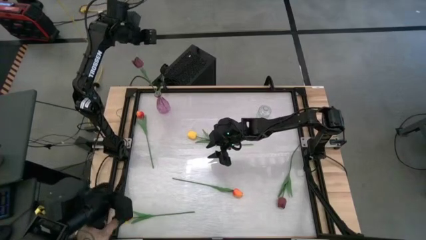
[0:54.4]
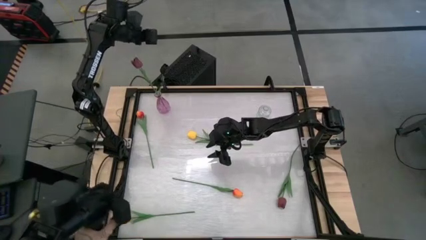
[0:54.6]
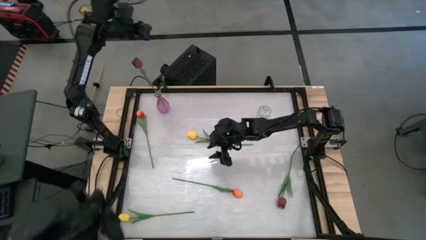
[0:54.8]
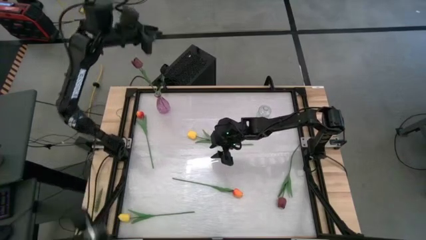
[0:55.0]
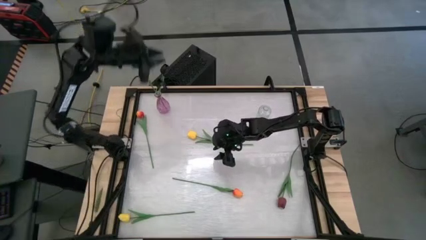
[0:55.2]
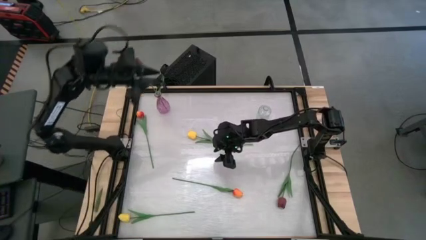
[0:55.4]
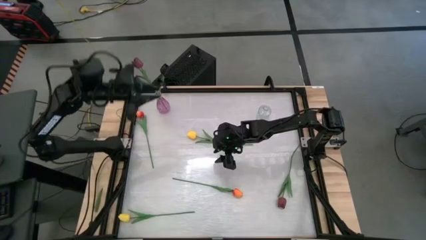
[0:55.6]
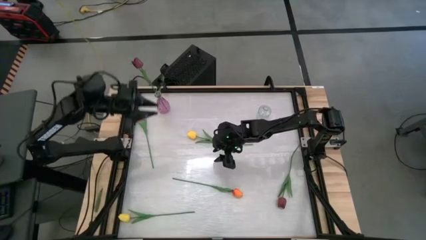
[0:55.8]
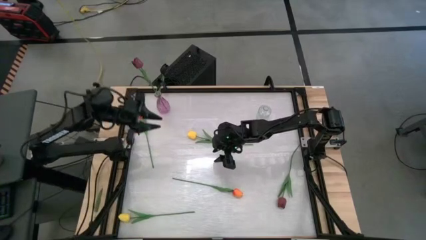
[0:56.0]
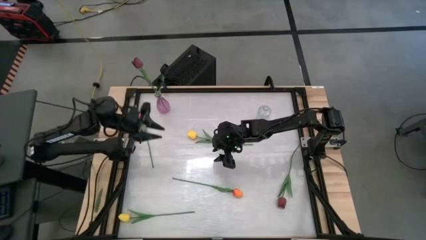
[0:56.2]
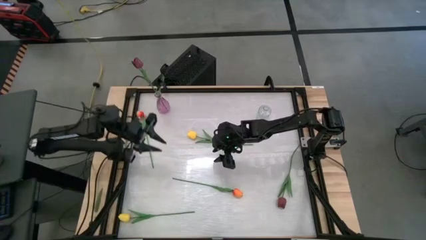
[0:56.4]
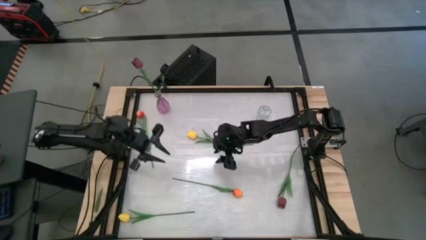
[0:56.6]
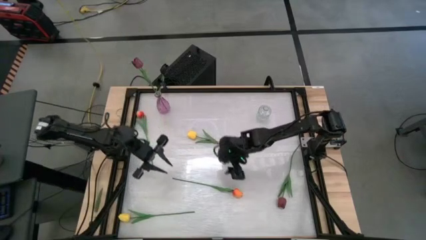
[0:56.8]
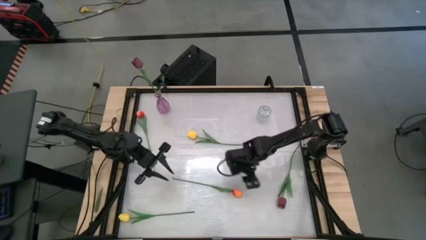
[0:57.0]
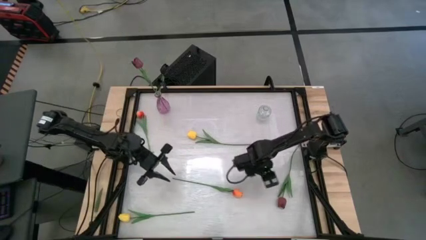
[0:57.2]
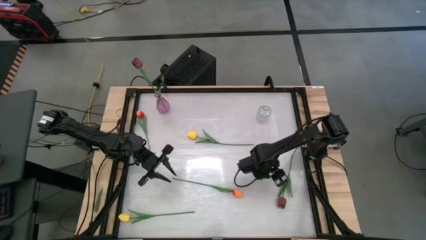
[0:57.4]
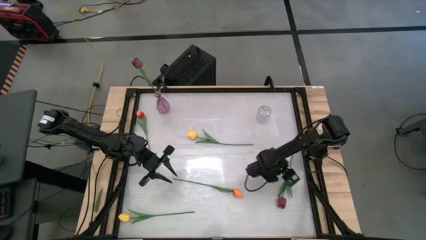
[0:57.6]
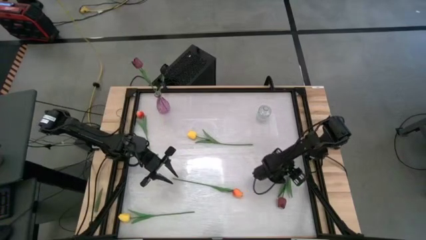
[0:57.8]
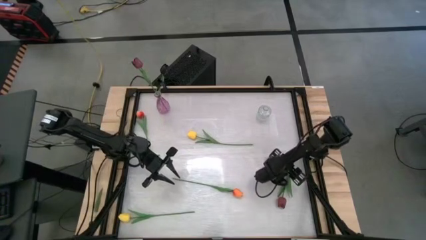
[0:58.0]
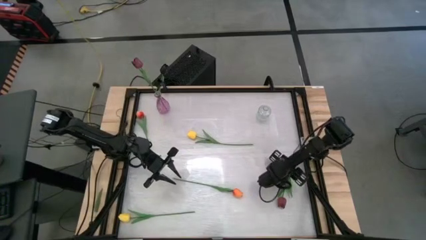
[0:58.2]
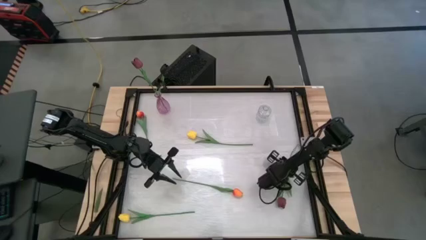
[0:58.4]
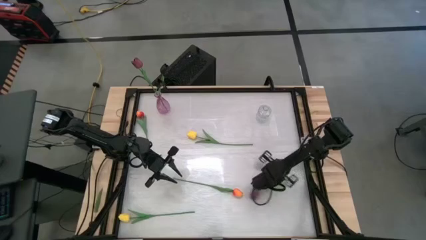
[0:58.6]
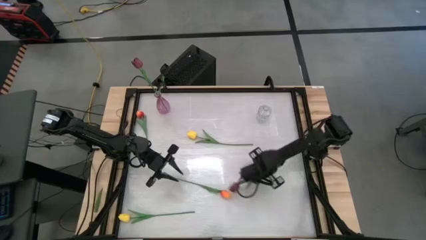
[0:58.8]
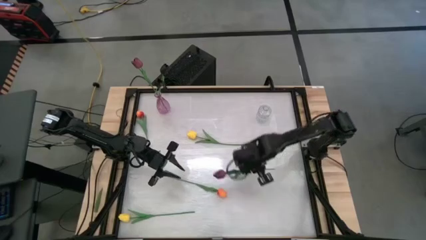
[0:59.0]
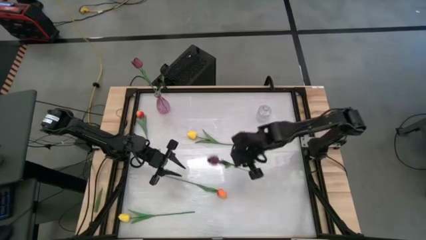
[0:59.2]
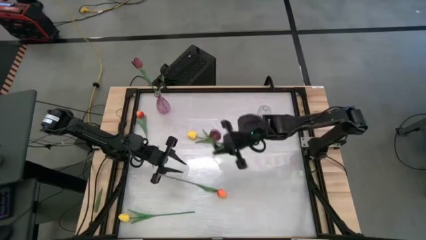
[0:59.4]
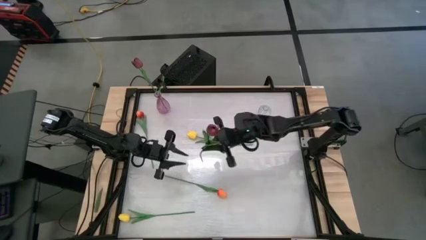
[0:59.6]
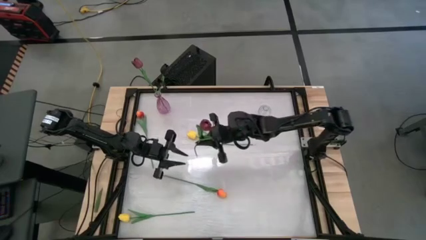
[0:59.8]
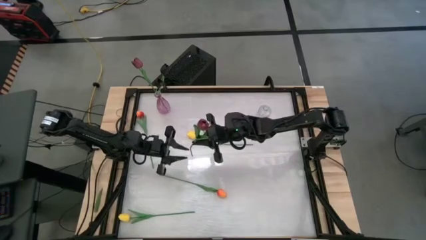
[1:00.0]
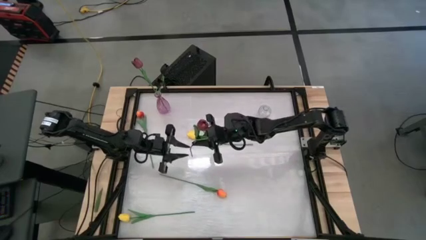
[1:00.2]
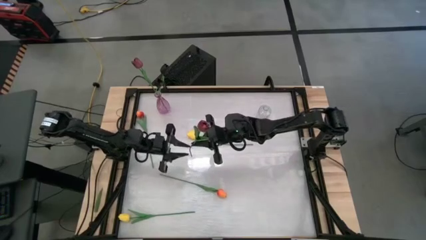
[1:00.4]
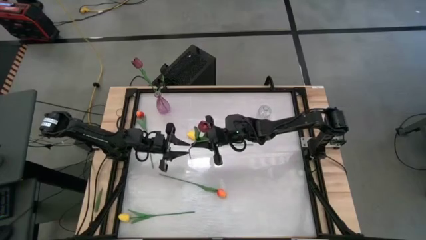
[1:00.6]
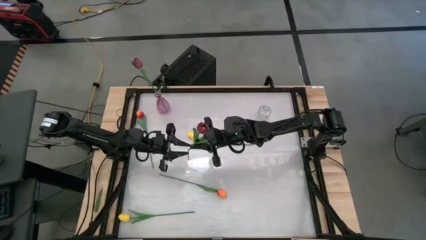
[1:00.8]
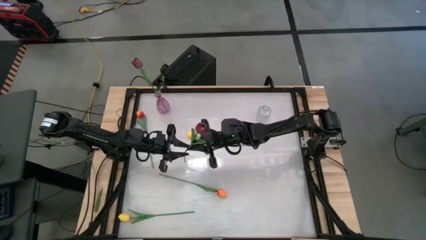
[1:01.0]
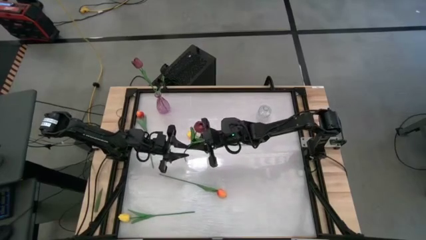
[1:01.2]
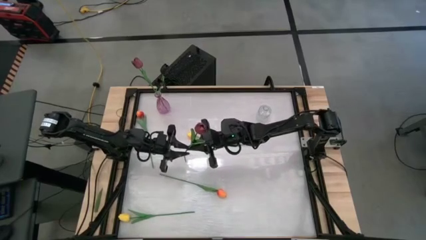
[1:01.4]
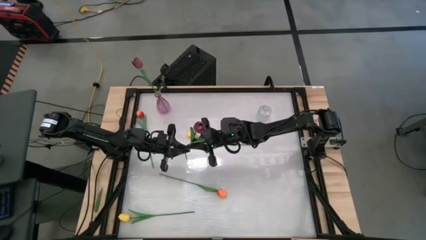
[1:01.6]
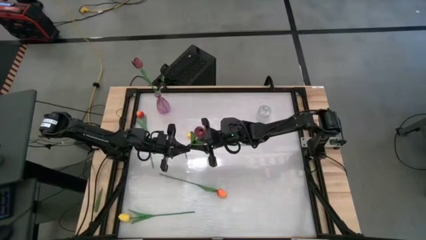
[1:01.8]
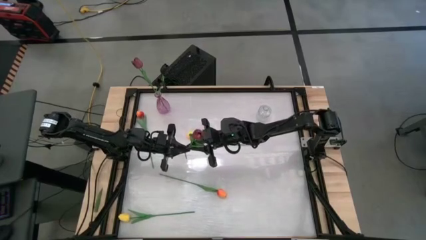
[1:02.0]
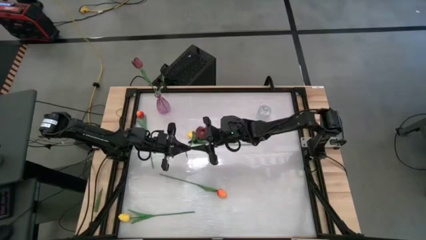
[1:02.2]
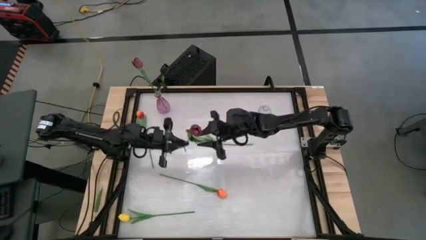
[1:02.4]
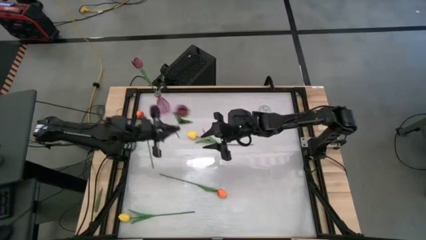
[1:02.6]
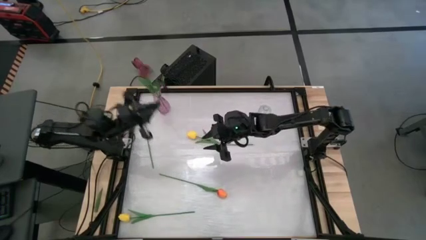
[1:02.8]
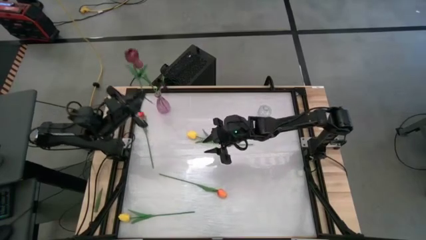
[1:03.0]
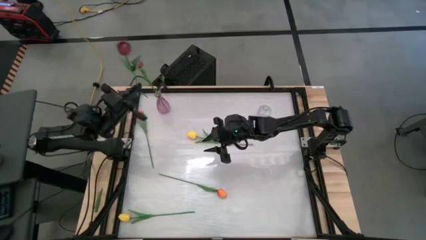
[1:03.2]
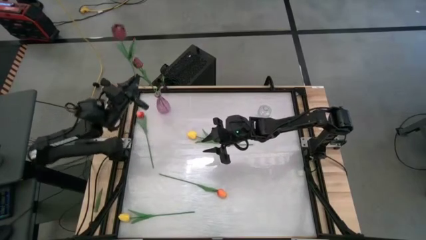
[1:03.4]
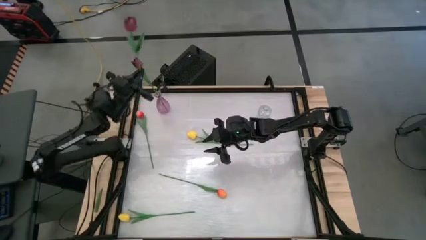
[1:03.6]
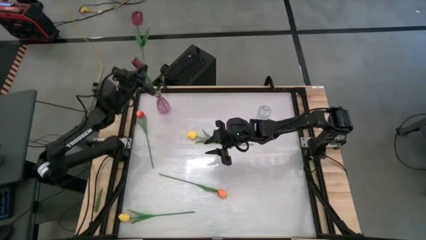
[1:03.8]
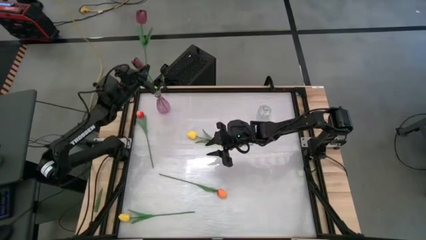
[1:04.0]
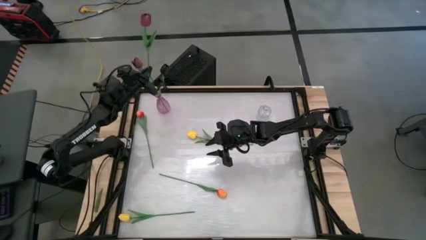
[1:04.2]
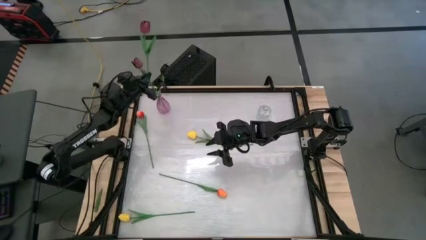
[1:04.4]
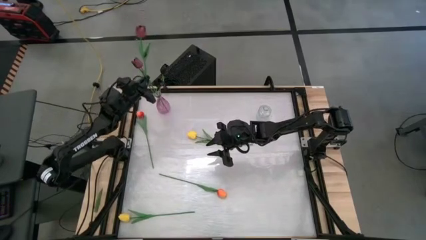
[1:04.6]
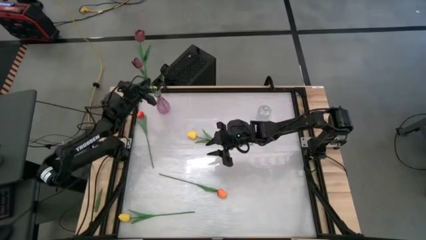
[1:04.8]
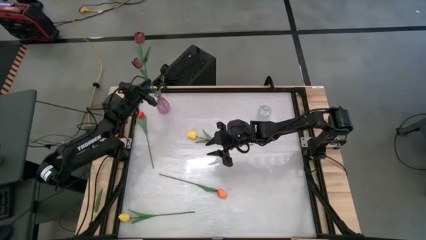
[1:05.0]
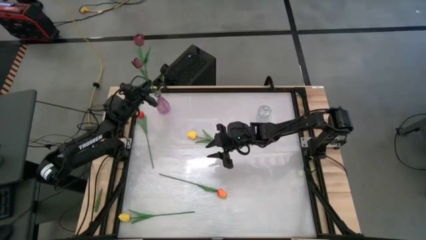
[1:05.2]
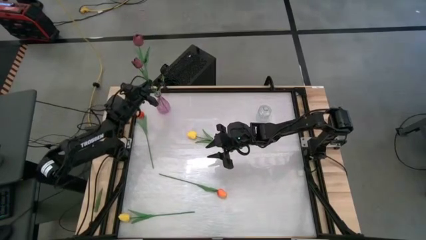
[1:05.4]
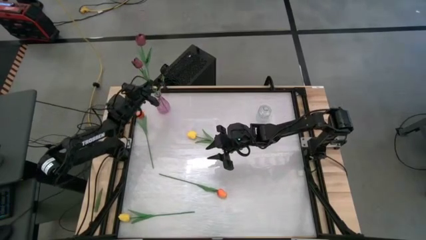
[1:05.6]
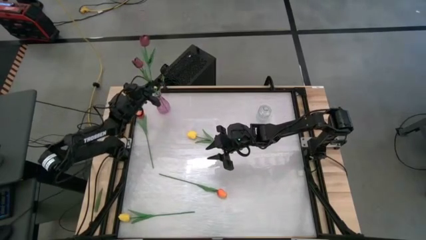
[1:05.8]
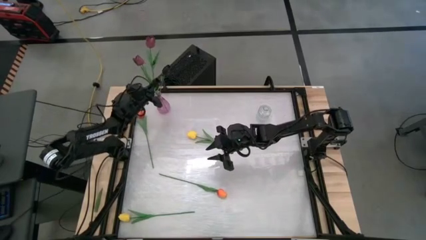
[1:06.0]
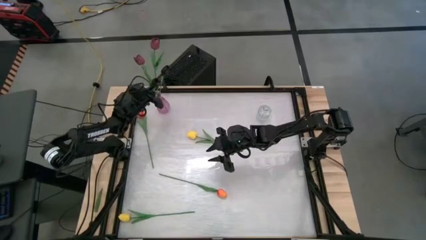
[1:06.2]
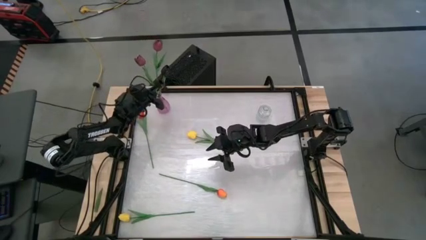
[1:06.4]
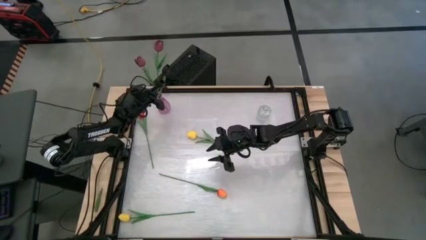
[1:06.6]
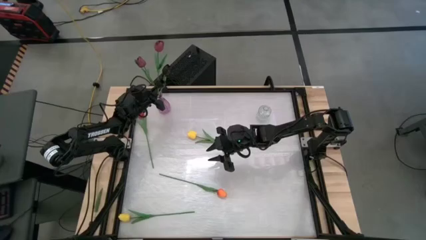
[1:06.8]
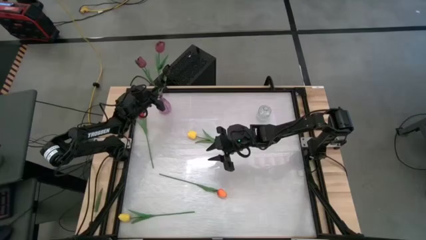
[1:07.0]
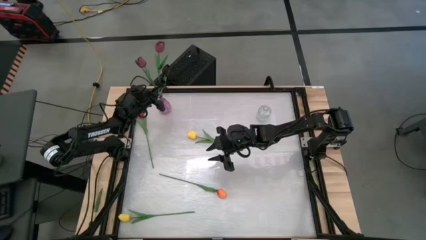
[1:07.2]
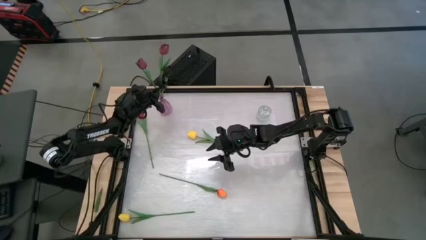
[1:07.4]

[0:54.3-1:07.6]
Task: Sort flowers into vase by color
Put the red tulip into the violet vase

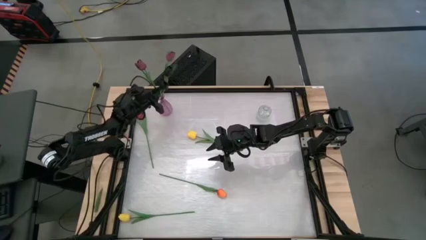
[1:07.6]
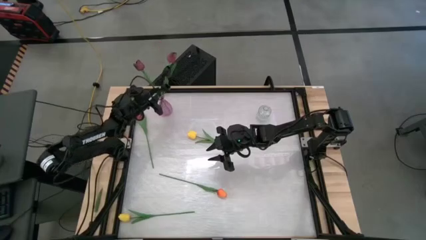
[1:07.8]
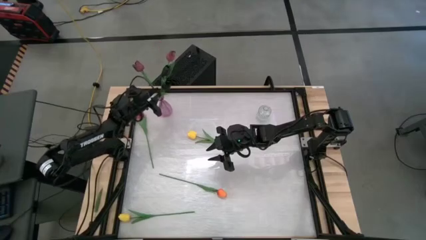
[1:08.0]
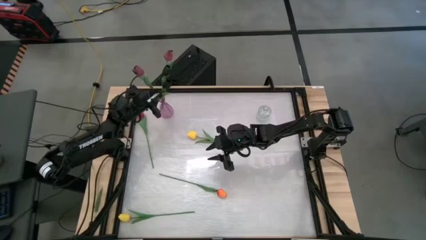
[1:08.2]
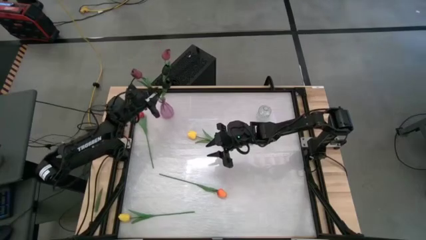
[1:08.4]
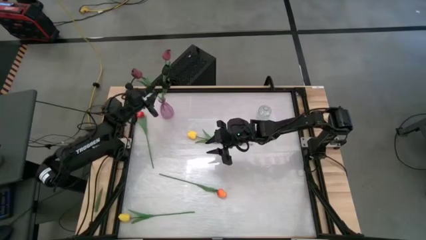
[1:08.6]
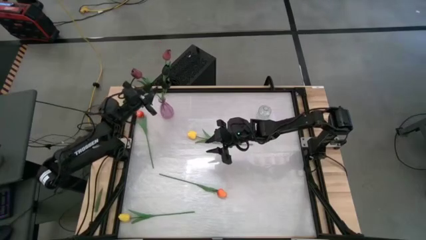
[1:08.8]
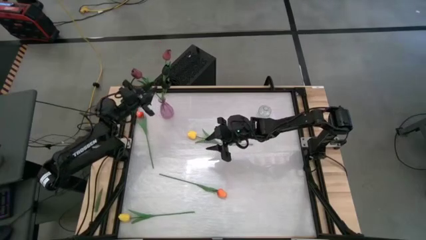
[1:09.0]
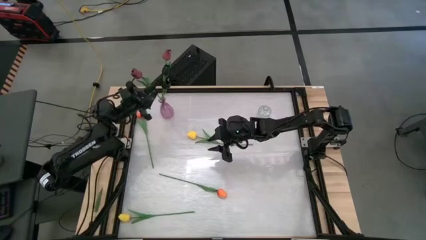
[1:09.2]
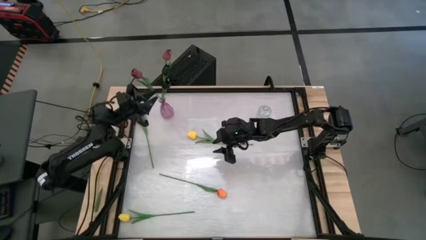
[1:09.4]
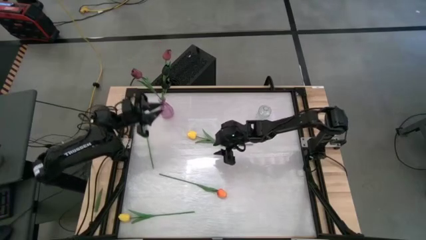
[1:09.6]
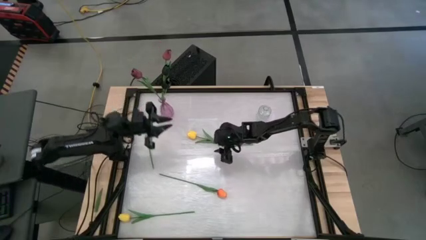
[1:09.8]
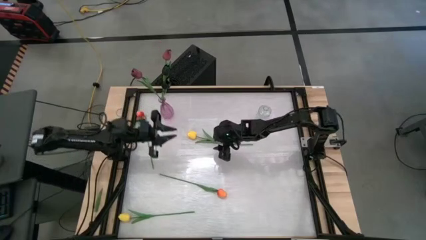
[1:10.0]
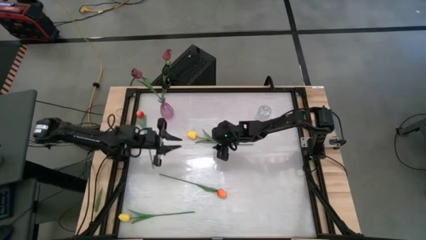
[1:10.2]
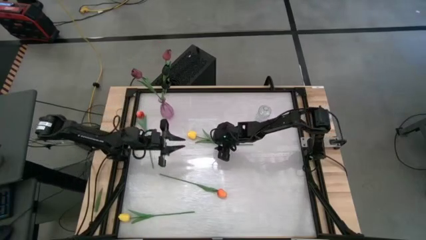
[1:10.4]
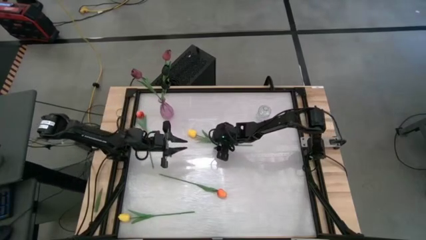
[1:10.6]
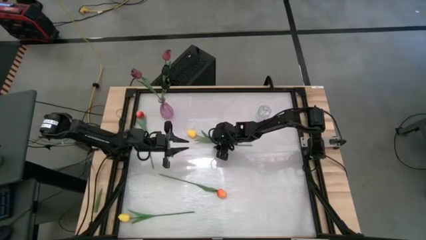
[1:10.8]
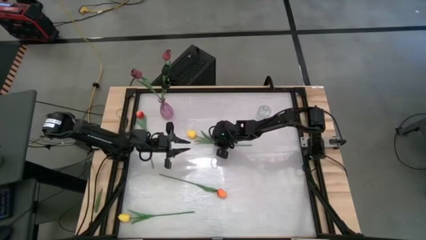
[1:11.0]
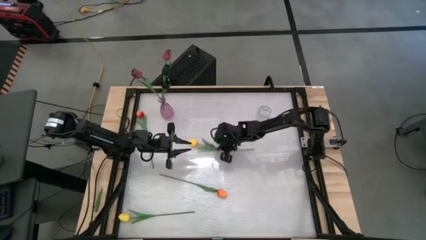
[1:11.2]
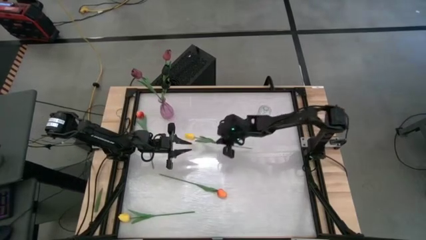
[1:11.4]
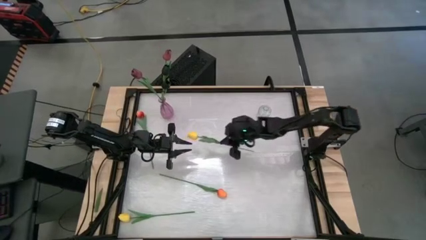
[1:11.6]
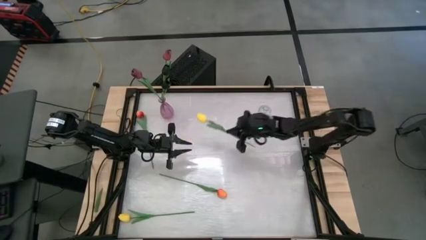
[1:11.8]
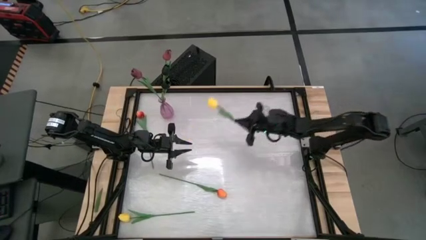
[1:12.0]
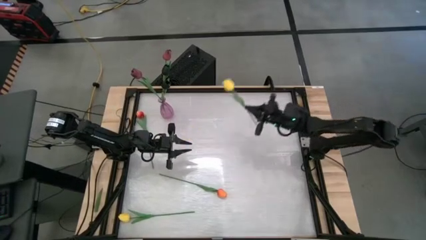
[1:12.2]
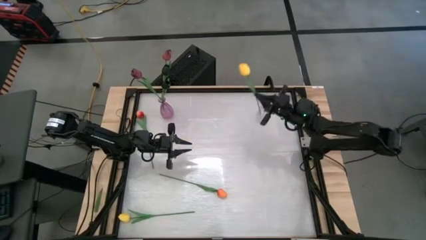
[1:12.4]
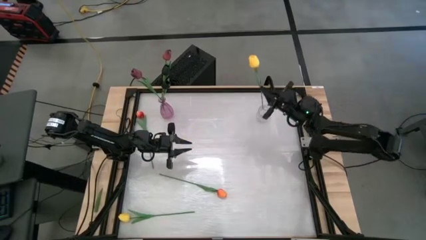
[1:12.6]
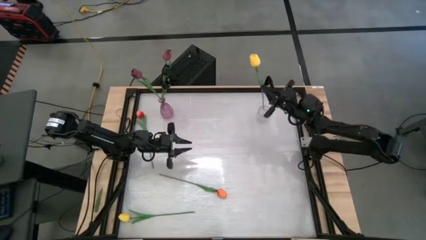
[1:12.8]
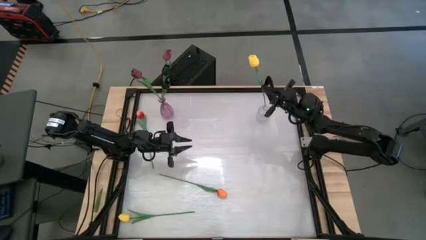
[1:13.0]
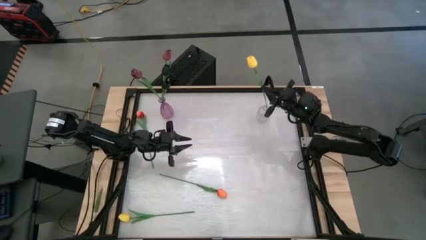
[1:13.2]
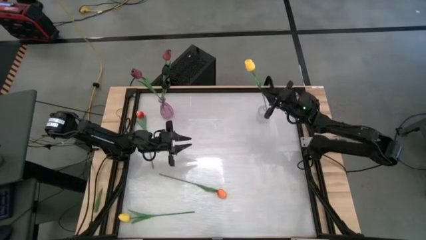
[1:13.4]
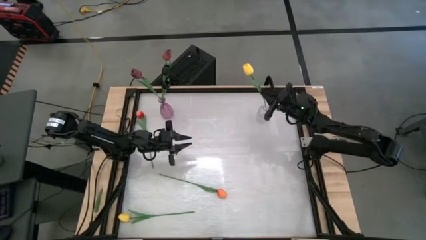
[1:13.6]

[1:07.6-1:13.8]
Put the top yellow tulip into the transparent vase
